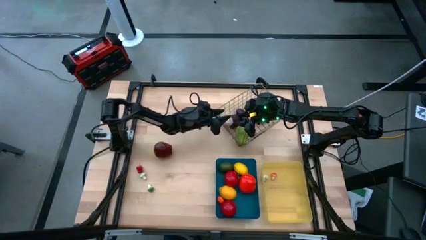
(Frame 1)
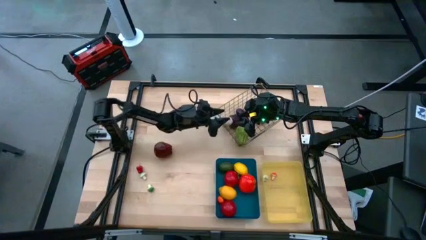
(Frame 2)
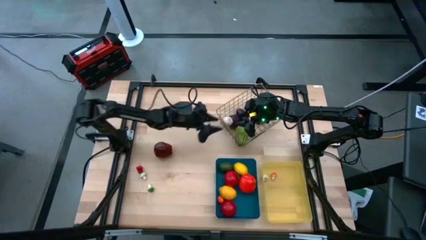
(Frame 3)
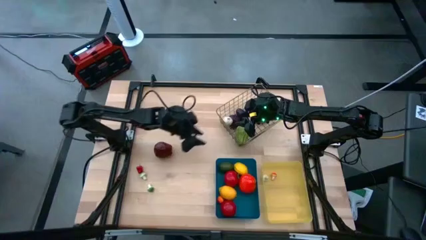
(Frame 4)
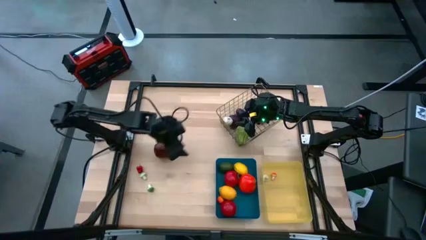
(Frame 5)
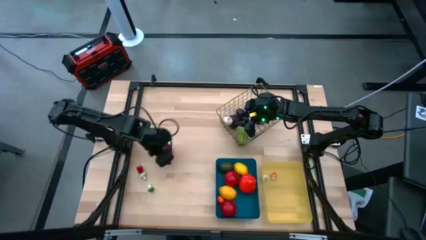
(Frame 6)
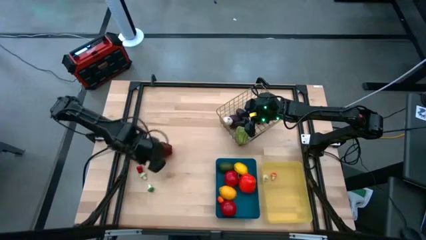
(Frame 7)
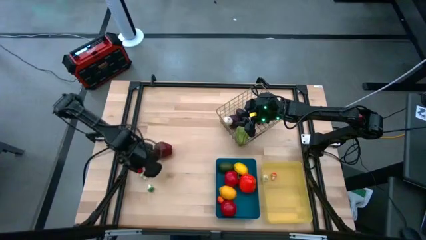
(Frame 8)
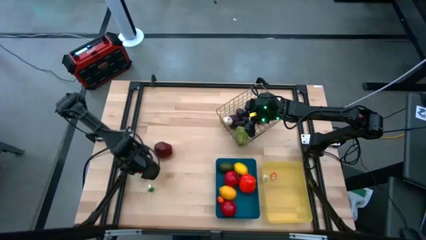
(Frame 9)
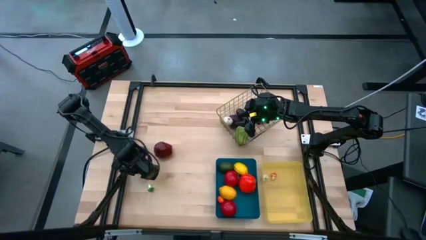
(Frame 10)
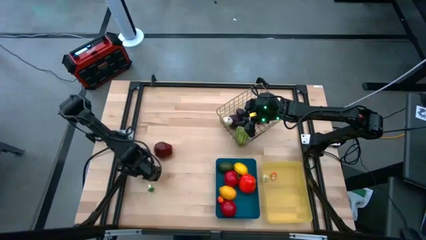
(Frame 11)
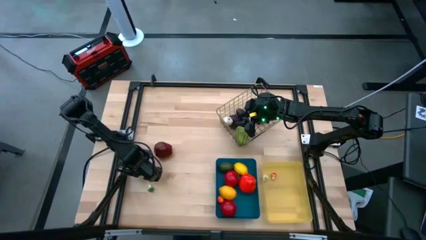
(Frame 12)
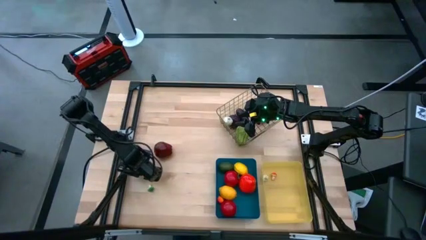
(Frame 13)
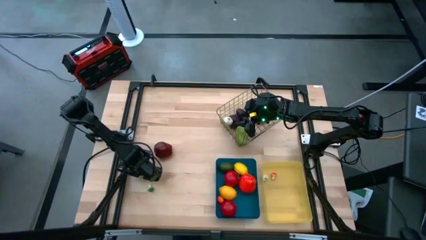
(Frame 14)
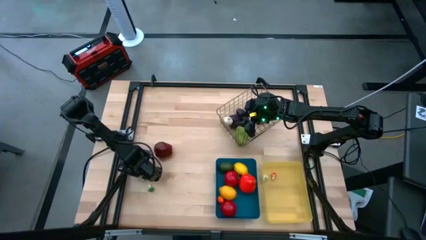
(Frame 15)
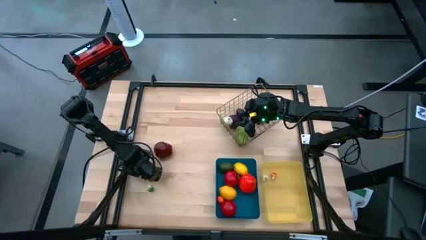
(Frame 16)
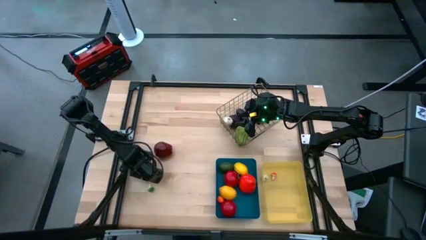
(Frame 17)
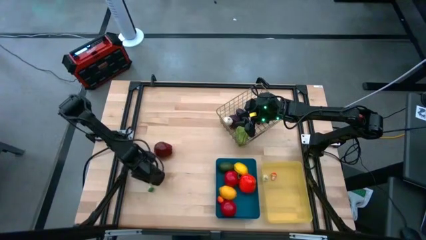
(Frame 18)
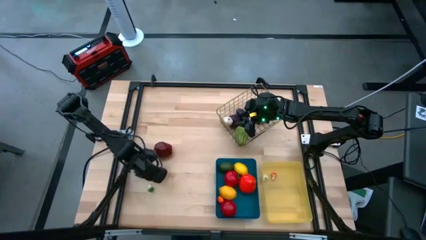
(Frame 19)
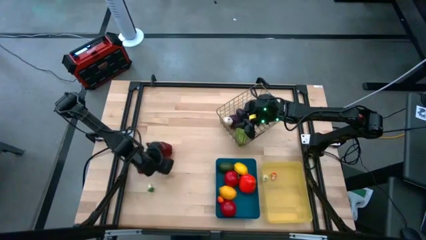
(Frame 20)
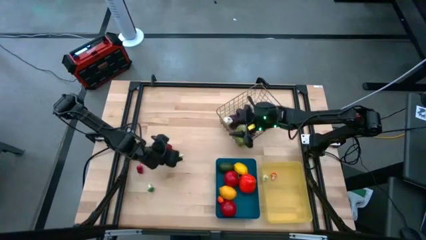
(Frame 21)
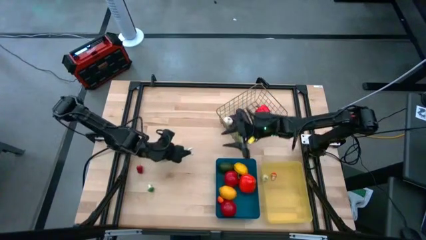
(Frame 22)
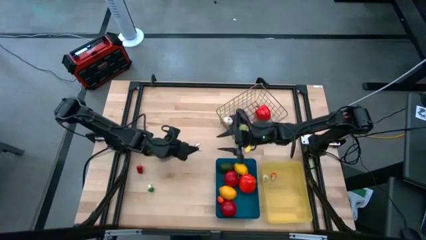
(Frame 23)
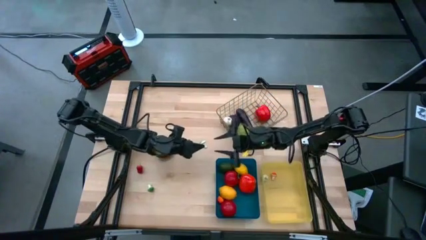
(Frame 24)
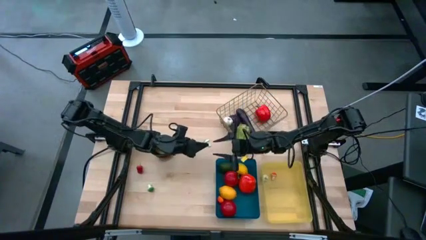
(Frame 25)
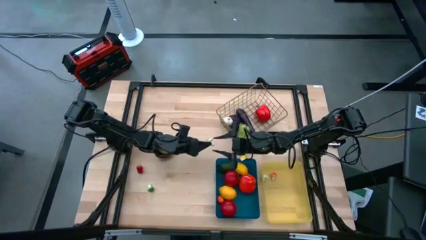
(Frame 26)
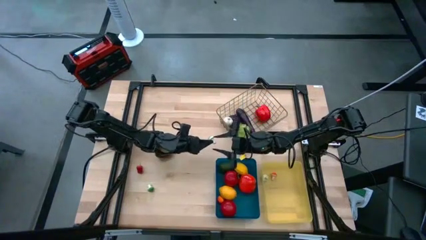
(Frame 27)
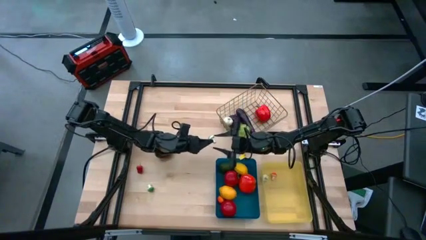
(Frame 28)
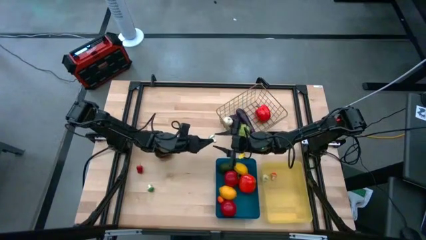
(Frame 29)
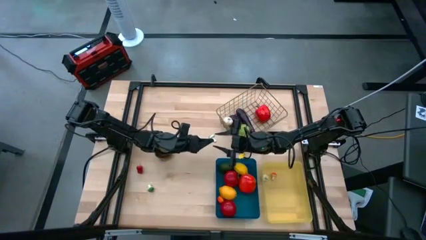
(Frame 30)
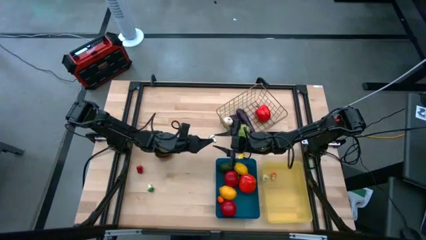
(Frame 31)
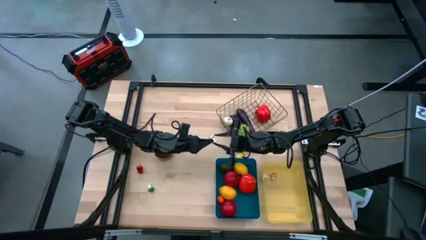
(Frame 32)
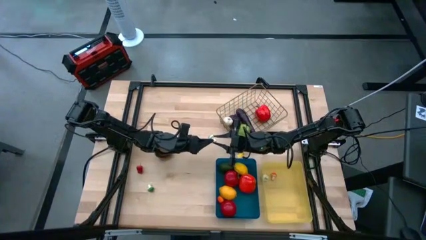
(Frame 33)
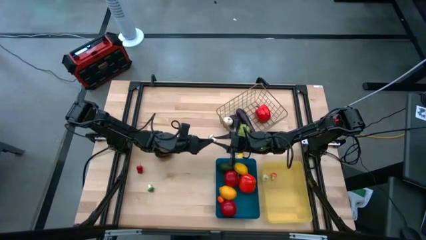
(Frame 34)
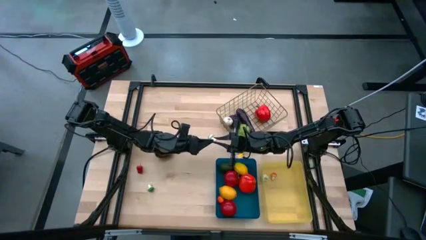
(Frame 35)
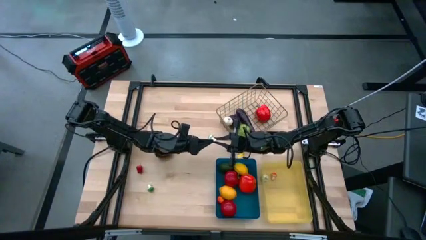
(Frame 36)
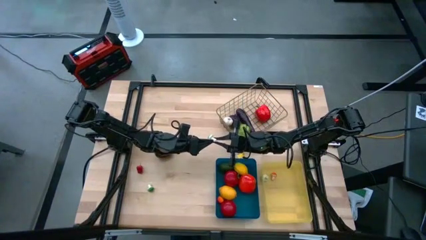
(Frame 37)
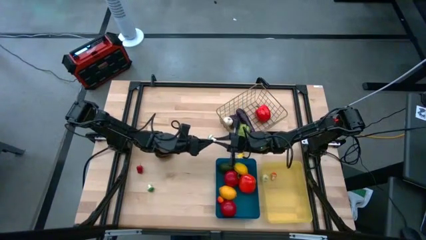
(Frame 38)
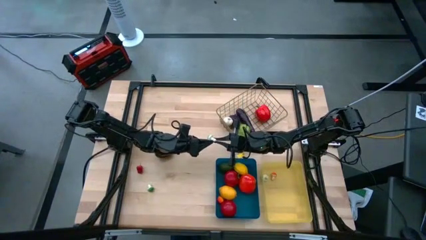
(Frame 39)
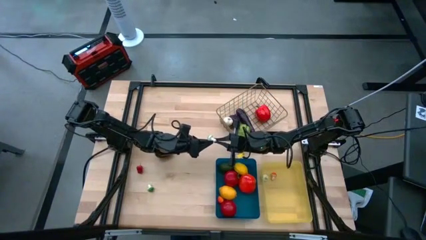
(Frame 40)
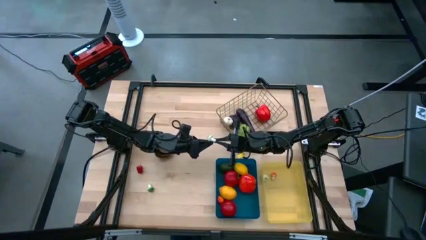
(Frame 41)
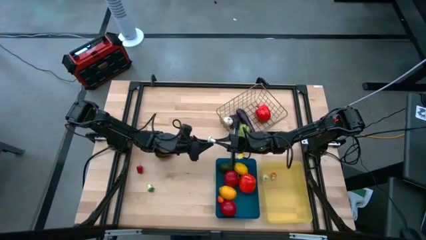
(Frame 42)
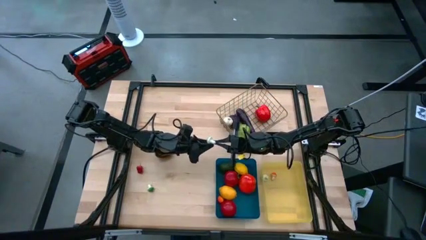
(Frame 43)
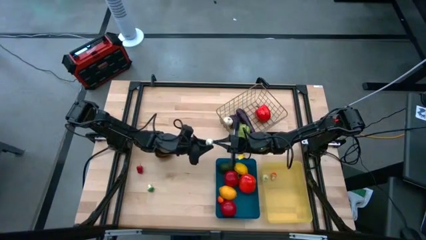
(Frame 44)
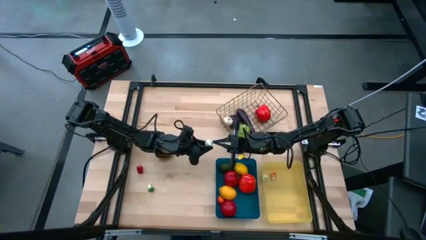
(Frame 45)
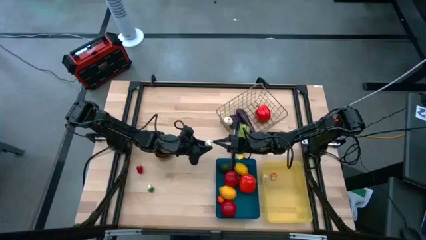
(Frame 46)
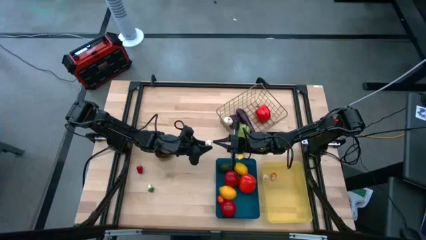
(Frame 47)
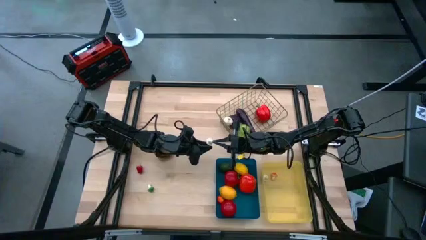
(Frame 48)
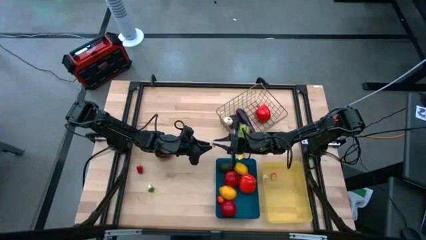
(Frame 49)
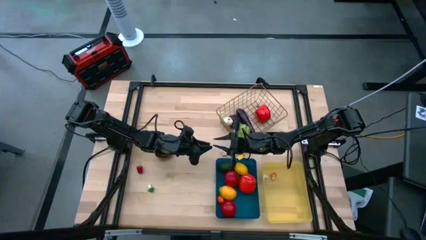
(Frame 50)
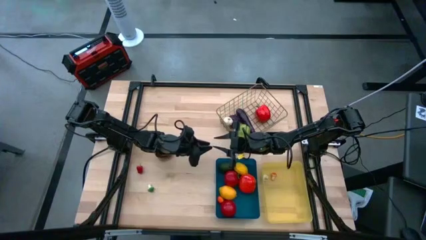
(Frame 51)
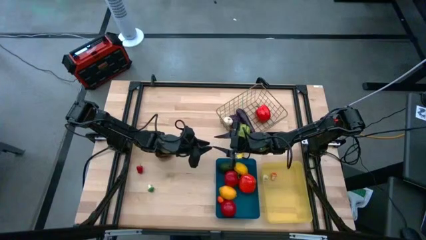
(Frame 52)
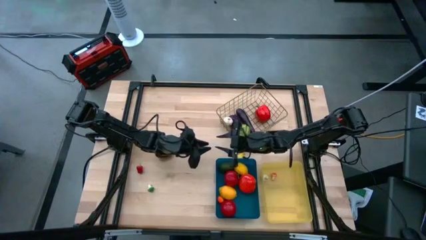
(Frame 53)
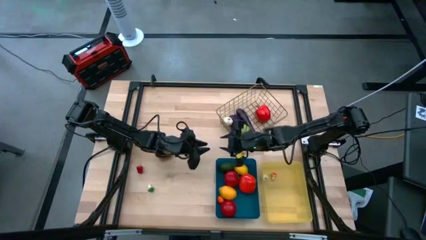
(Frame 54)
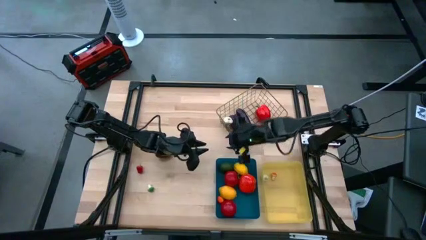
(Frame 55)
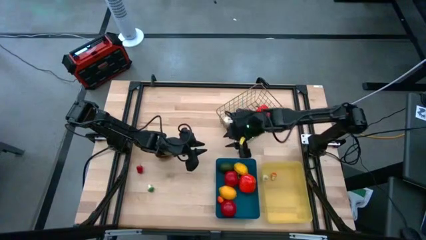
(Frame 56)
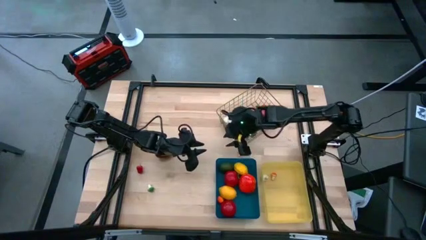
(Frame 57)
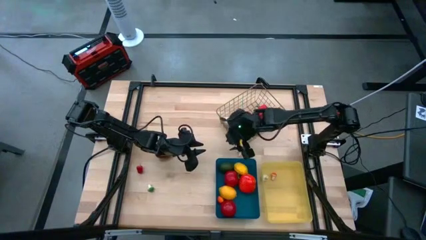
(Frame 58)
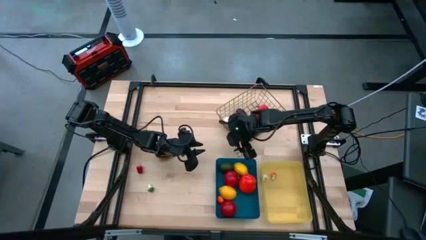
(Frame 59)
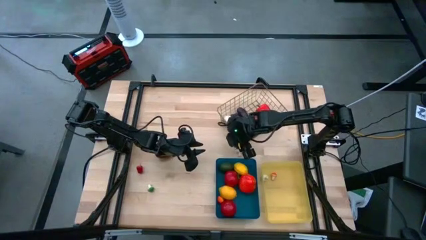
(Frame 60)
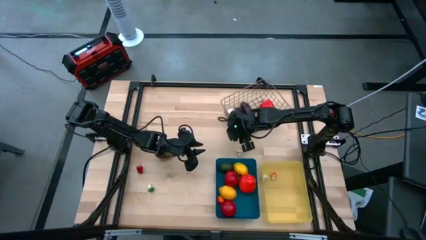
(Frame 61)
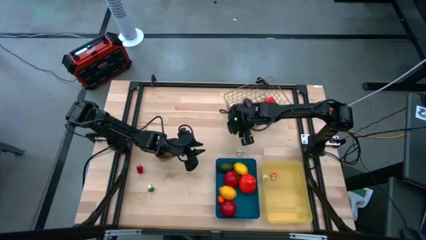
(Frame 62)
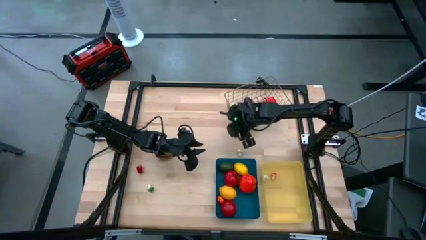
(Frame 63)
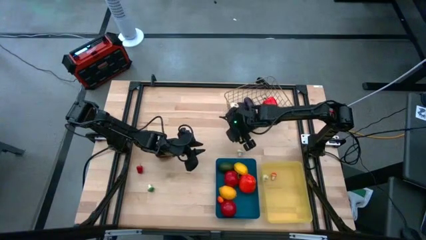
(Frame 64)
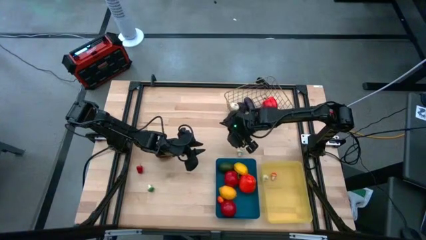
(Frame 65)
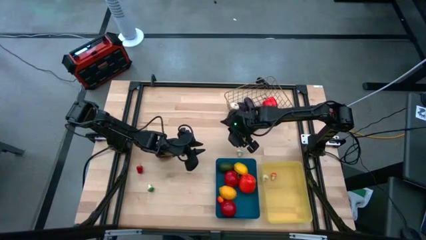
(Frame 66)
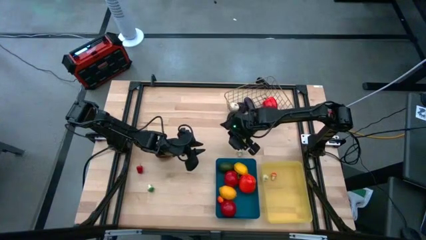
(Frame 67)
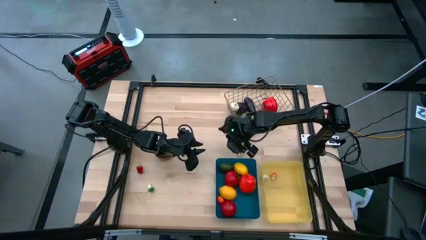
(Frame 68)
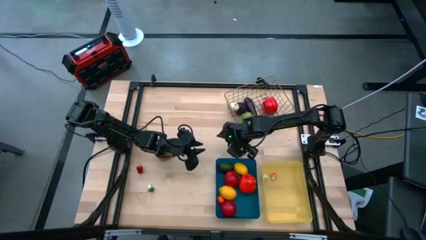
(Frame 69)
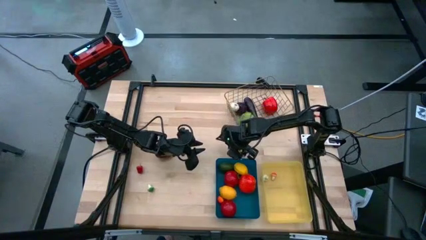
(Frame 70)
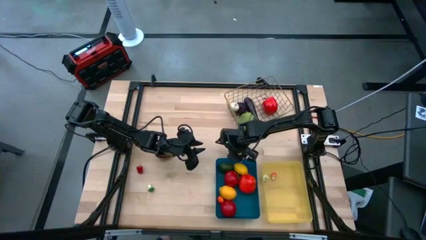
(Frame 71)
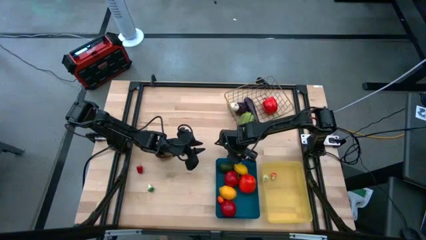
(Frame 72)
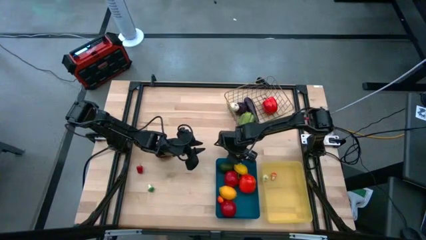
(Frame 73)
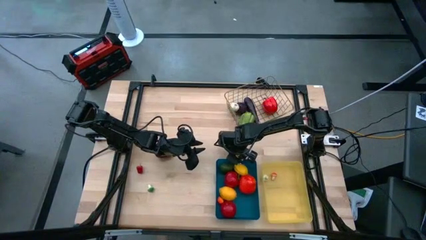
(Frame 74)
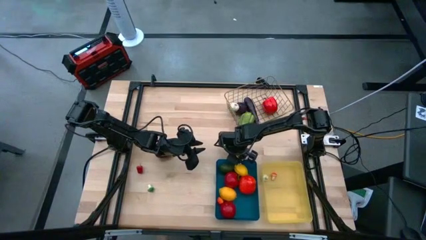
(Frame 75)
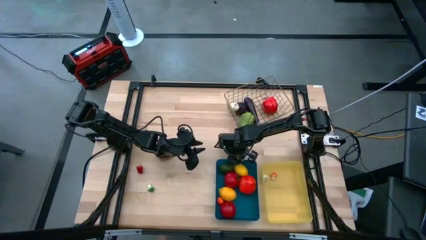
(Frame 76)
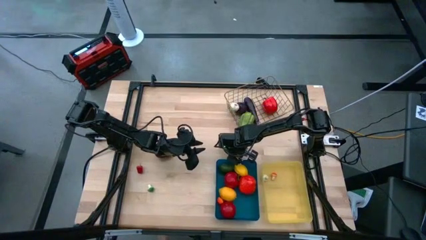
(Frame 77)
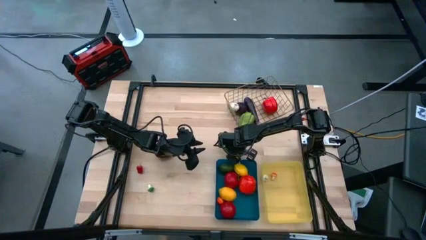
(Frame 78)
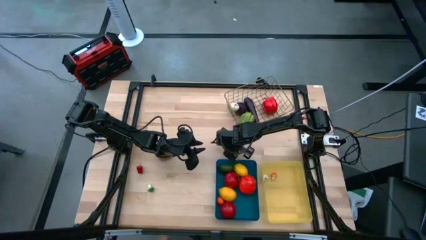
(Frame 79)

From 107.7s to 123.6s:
Task: Sort produce into baskets
Put the top green mushroom into the yellow bin
